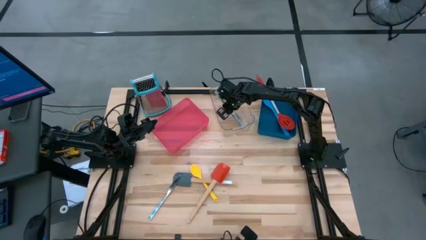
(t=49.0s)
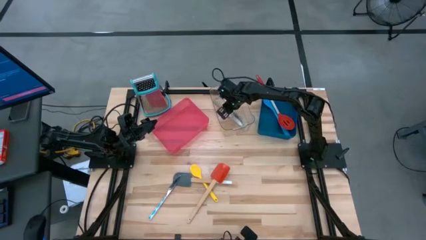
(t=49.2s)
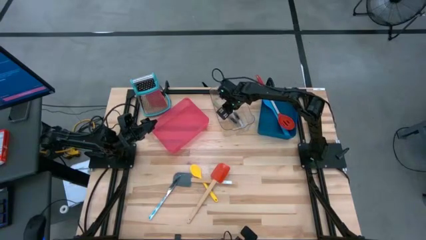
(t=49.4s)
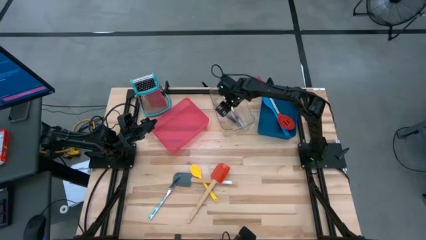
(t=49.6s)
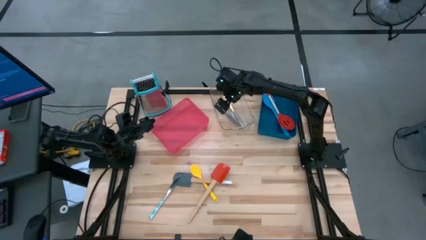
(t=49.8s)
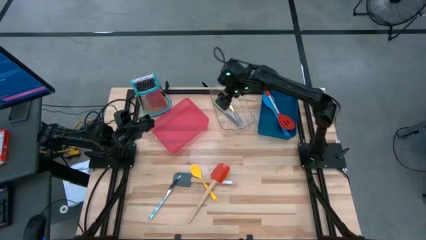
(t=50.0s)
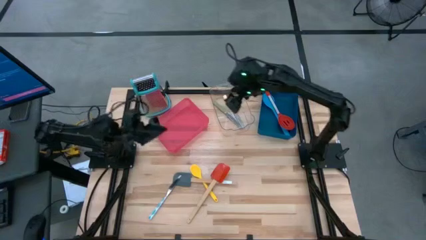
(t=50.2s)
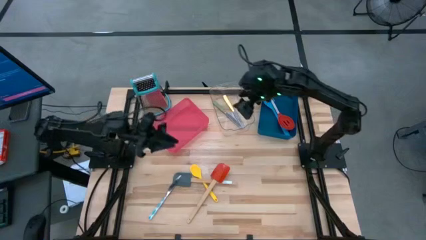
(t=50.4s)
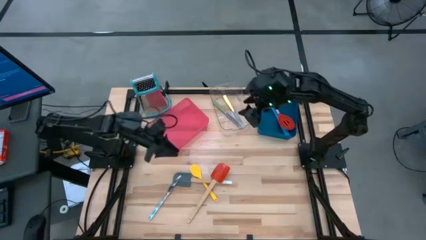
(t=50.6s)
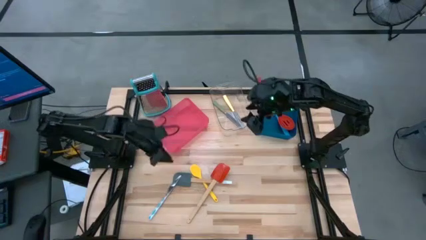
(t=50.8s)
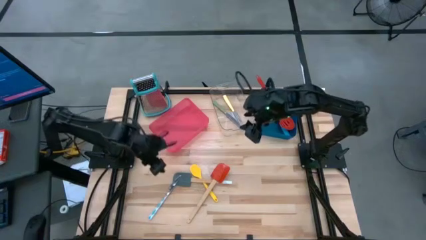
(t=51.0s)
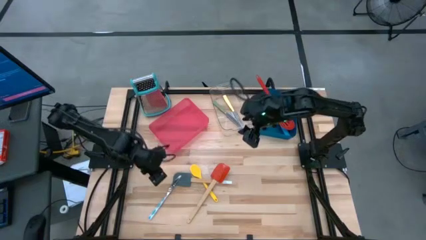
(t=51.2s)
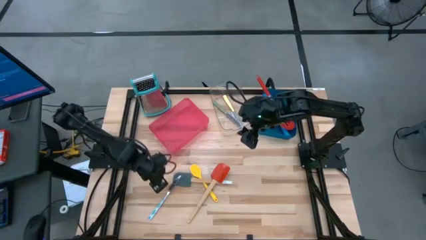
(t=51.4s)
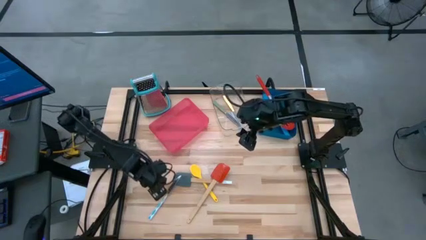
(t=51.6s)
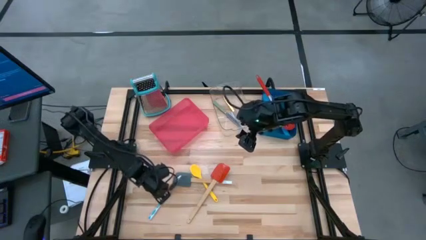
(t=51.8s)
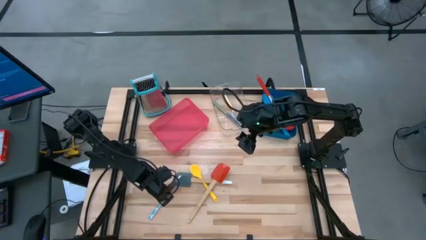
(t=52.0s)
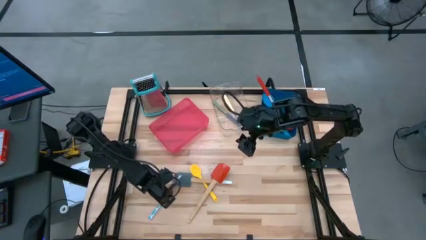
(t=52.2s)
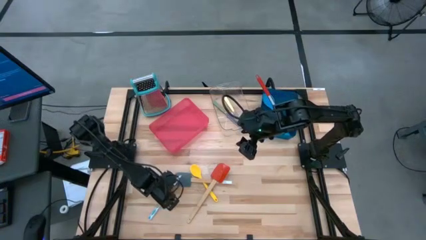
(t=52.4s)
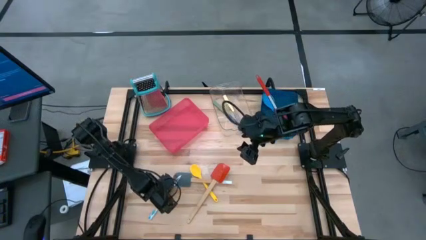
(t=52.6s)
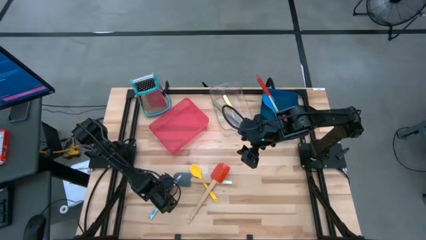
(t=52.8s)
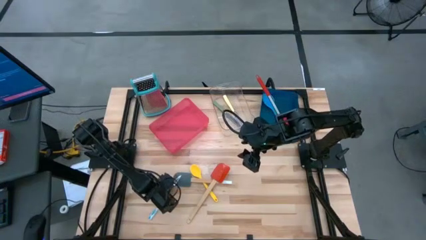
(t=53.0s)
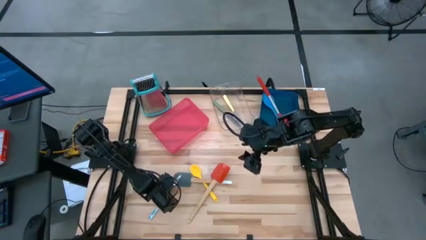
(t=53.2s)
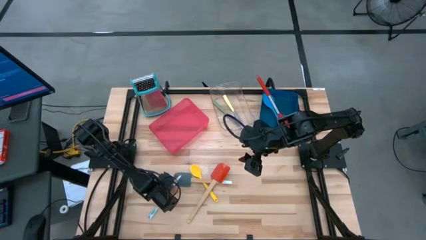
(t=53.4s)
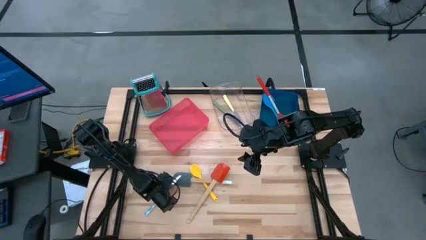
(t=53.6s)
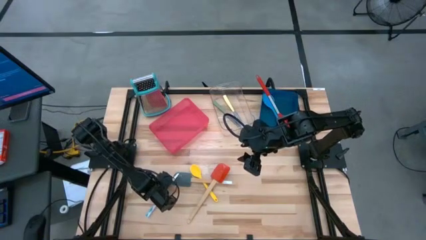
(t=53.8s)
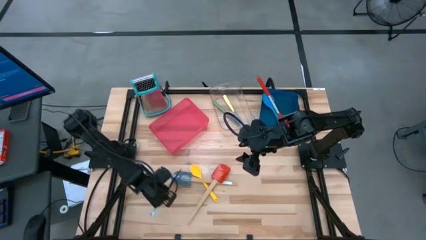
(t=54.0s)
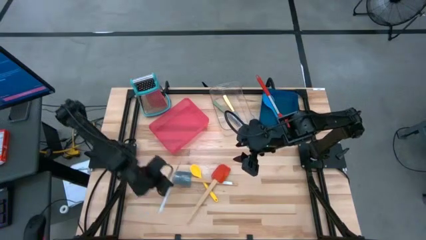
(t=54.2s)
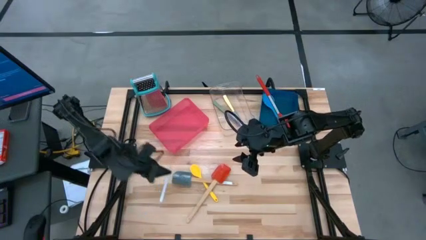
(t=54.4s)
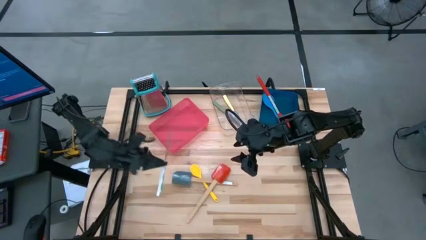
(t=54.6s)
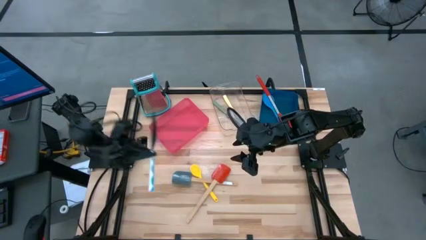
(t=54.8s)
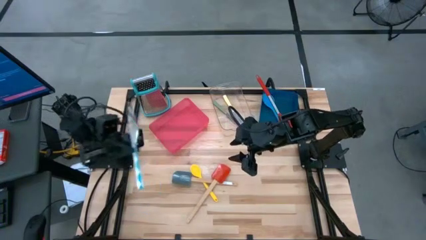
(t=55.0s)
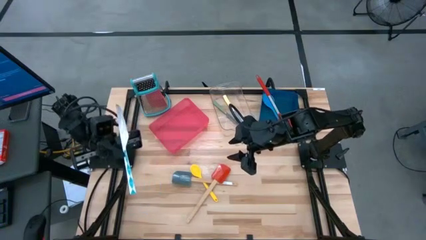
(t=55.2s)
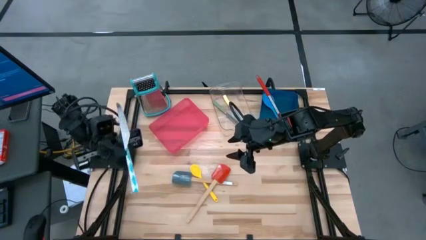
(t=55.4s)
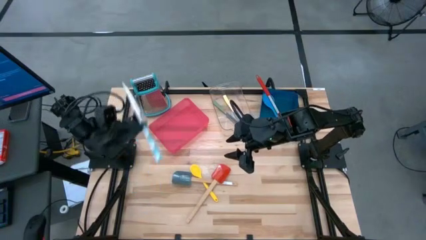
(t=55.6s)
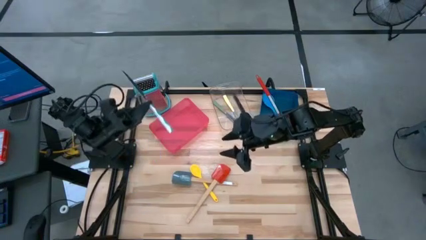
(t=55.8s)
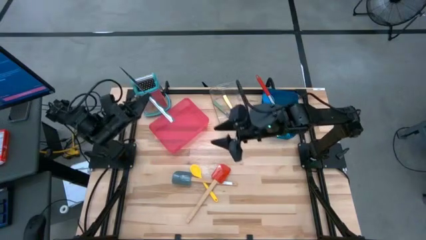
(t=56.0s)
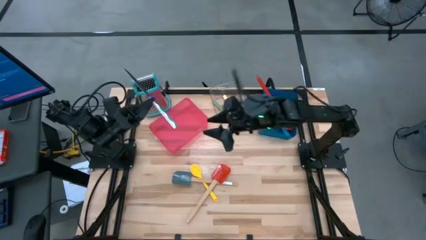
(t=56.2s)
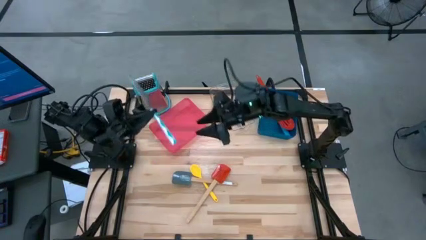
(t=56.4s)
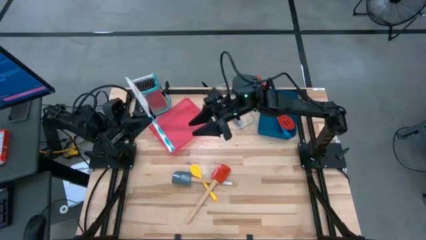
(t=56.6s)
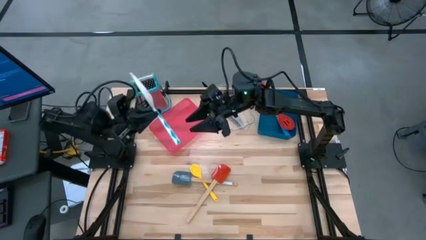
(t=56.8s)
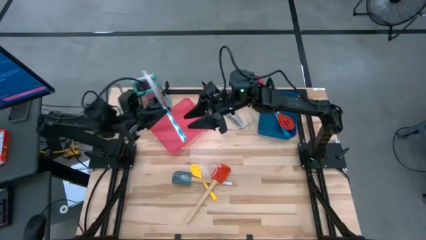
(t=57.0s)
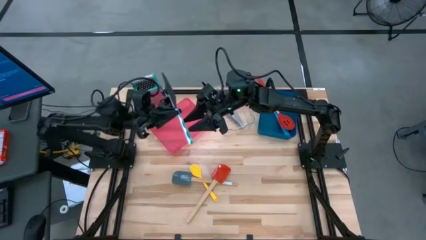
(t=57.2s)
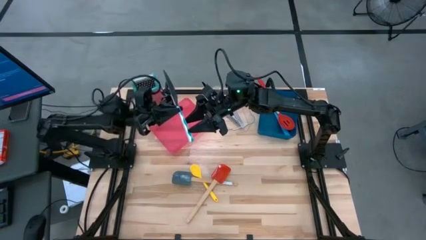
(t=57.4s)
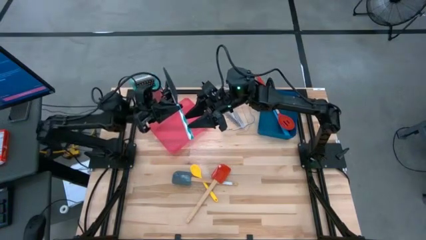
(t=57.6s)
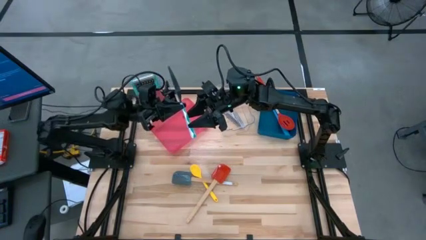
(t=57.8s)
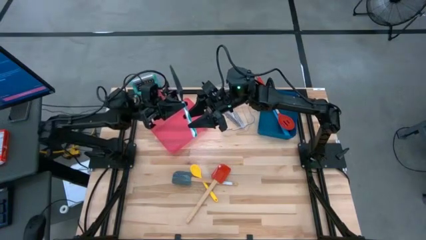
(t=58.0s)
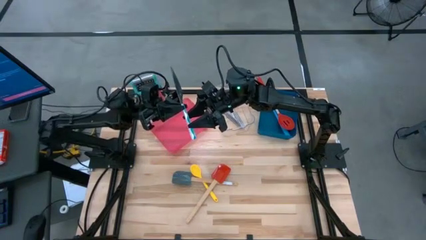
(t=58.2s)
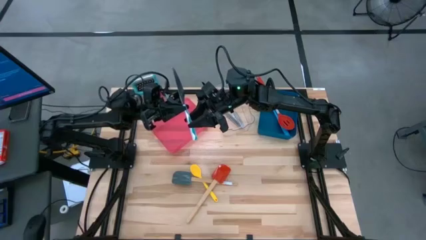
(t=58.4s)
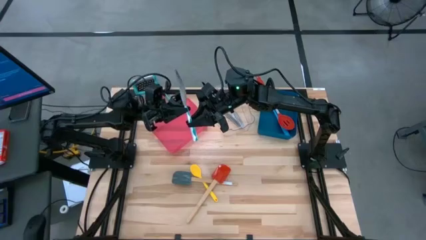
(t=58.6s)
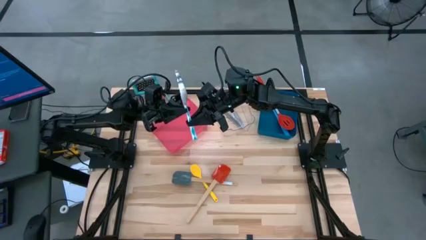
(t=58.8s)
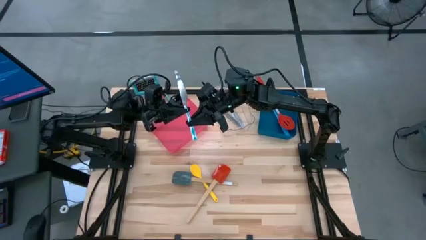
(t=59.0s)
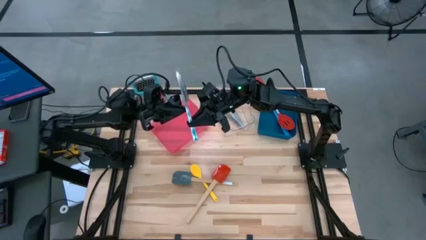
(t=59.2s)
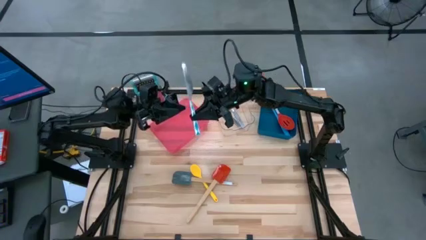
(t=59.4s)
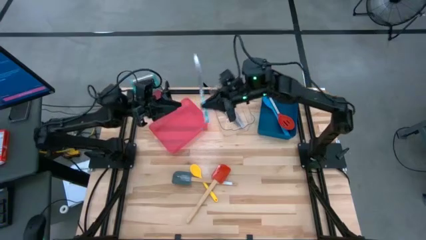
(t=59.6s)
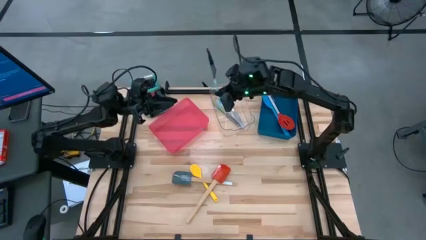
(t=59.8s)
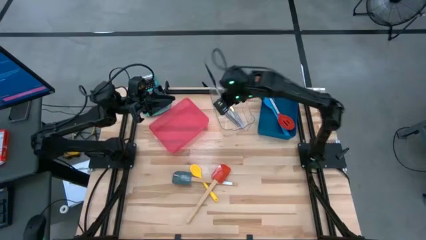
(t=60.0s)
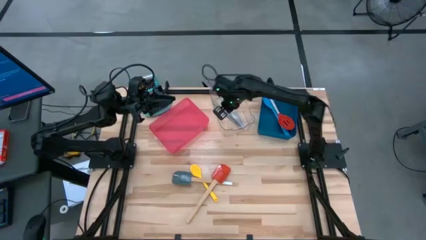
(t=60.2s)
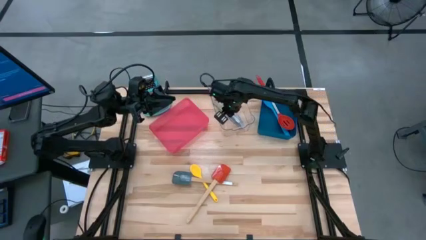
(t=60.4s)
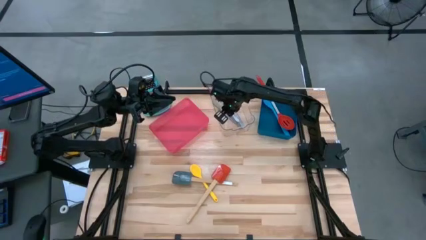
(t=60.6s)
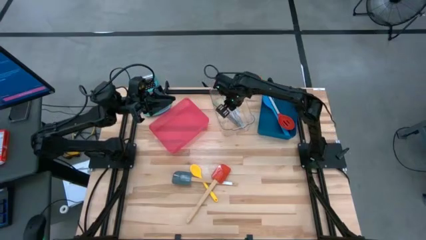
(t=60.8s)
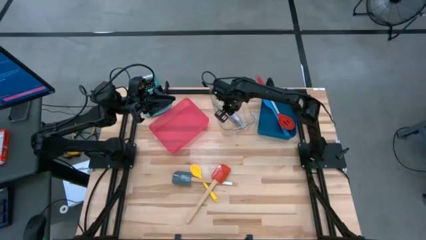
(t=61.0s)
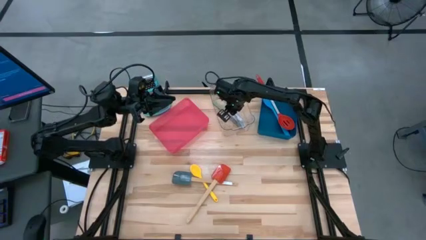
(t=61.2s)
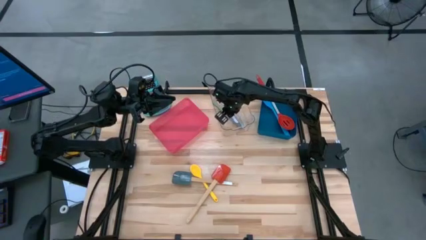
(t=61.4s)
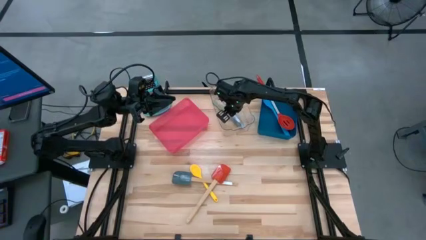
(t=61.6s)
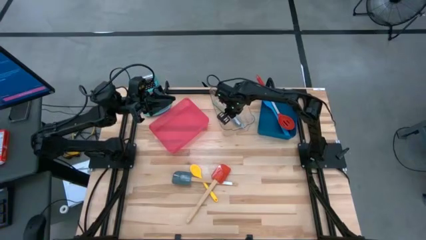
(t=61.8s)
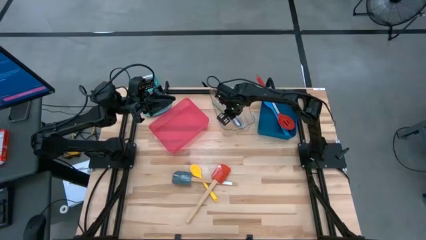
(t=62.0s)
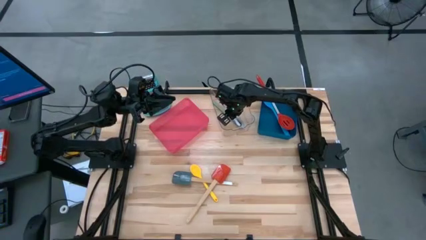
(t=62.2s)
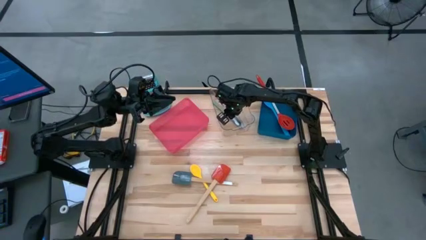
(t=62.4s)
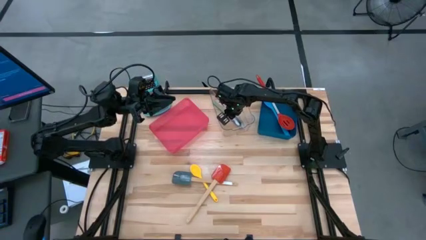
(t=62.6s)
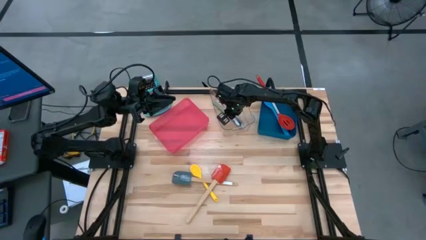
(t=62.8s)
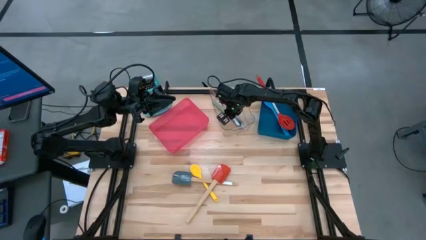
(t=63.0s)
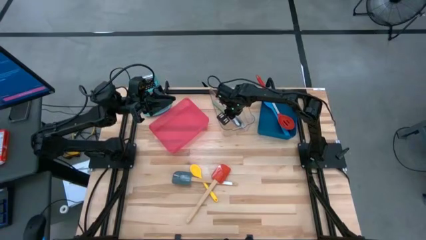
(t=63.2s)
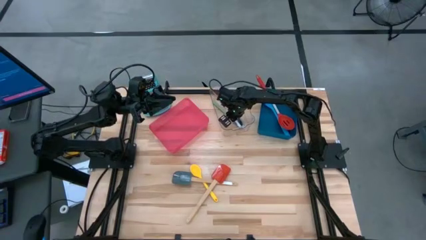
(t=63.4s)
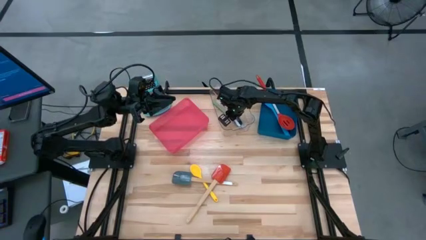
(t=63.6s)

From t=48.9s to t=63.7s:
Task: Pick & Place Kitchen Items
Put the blue and white knife into the transparent bin
